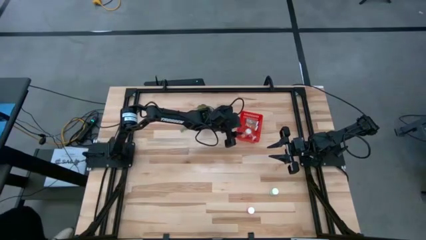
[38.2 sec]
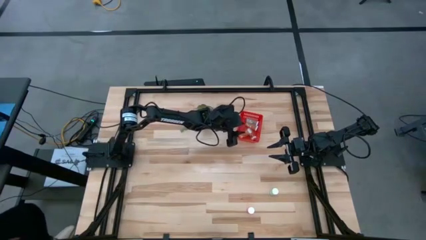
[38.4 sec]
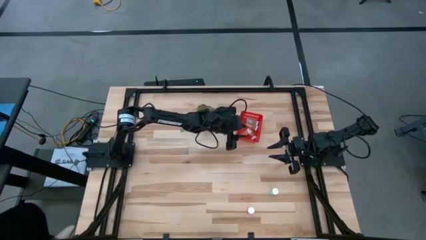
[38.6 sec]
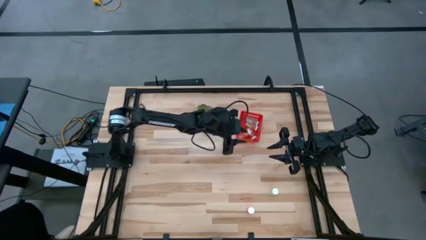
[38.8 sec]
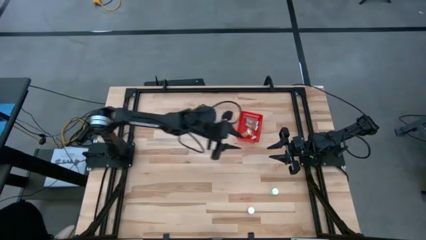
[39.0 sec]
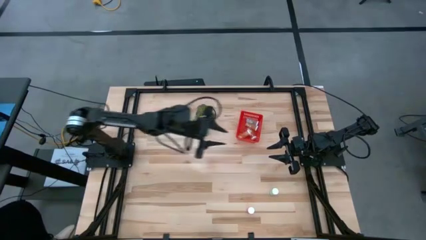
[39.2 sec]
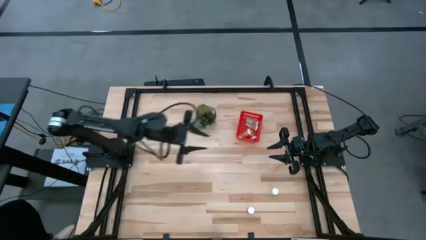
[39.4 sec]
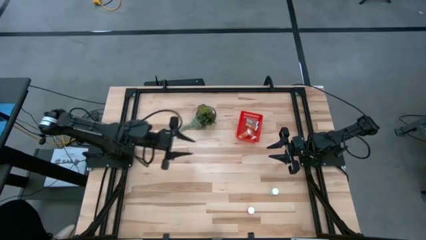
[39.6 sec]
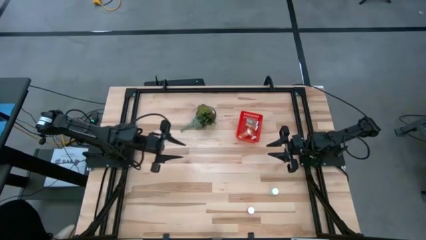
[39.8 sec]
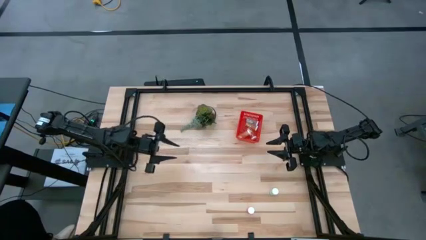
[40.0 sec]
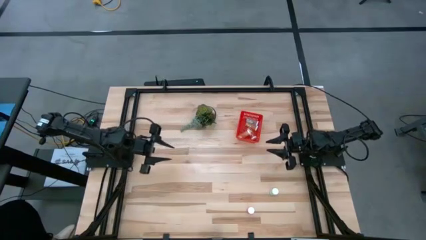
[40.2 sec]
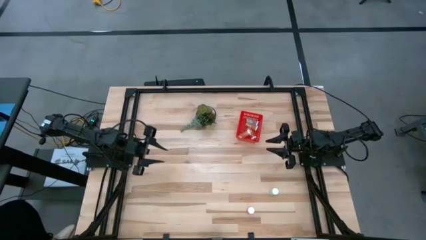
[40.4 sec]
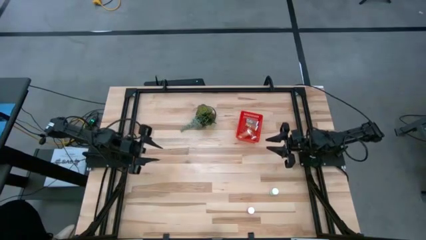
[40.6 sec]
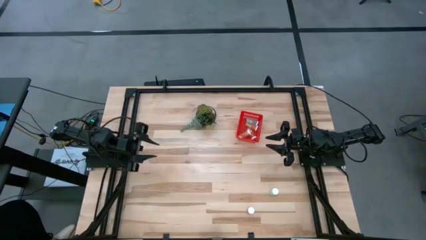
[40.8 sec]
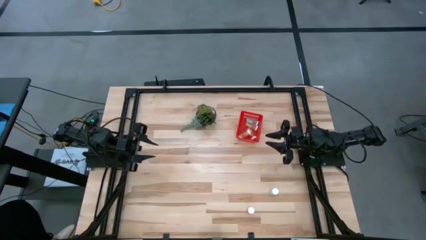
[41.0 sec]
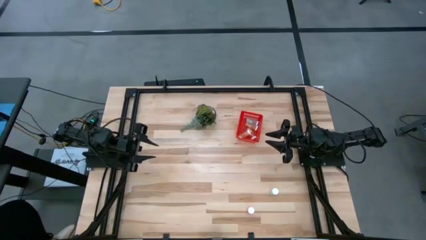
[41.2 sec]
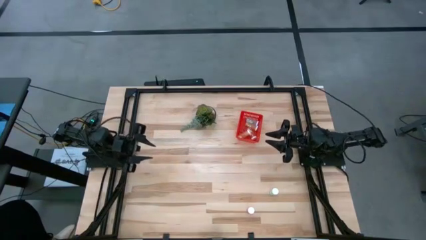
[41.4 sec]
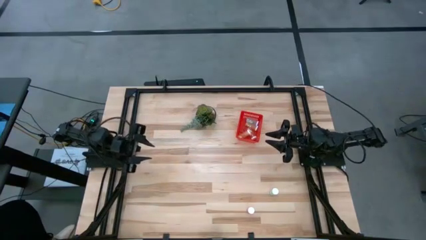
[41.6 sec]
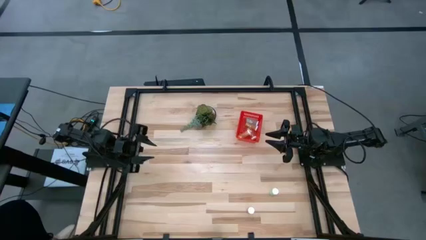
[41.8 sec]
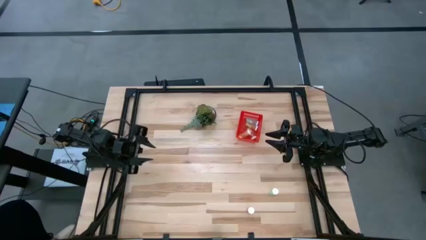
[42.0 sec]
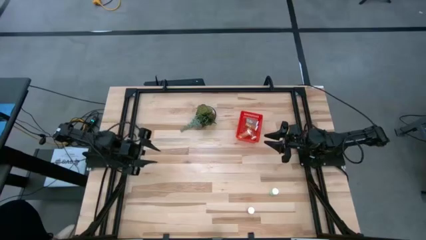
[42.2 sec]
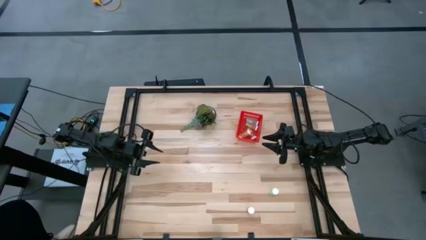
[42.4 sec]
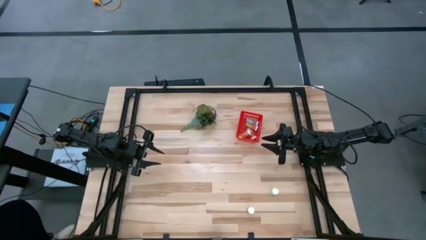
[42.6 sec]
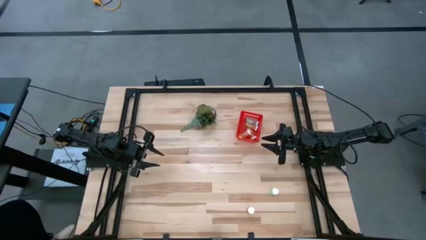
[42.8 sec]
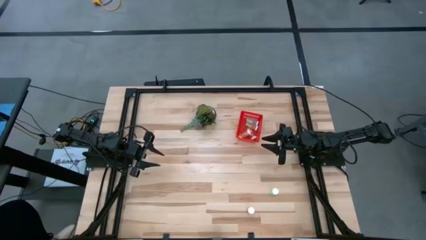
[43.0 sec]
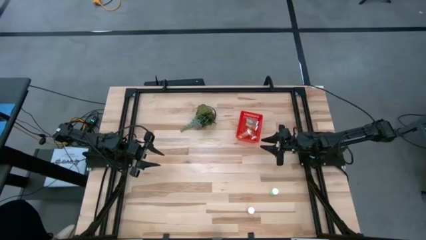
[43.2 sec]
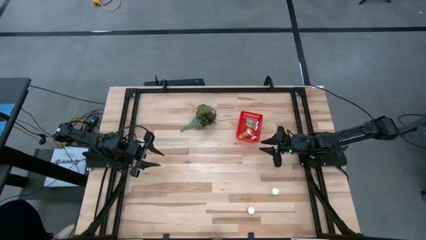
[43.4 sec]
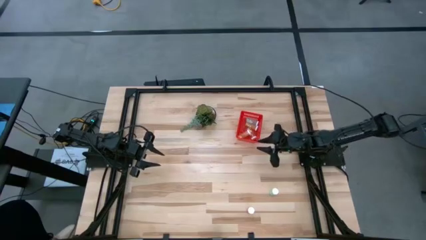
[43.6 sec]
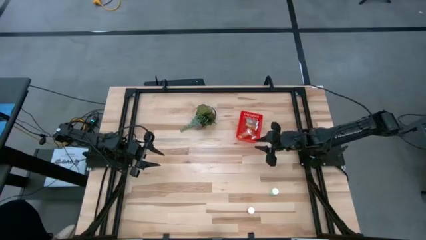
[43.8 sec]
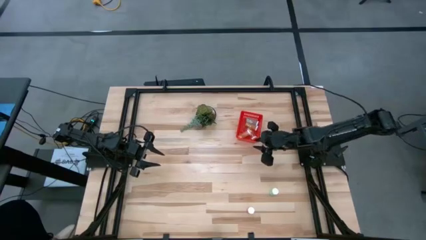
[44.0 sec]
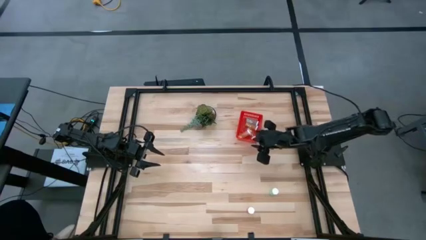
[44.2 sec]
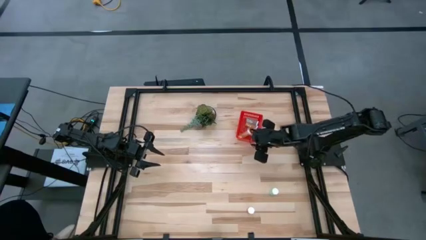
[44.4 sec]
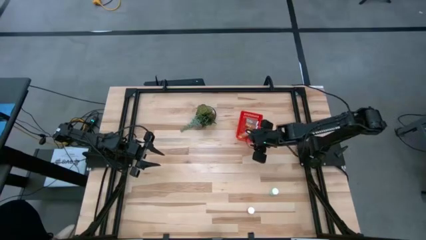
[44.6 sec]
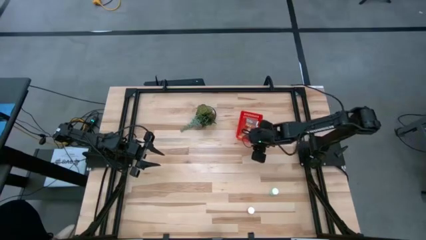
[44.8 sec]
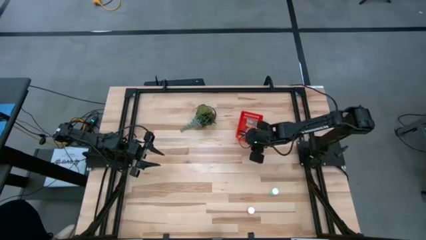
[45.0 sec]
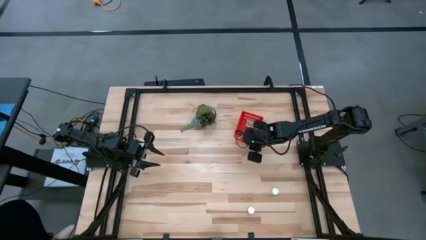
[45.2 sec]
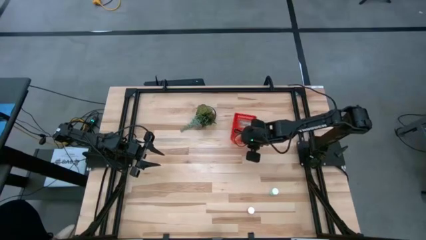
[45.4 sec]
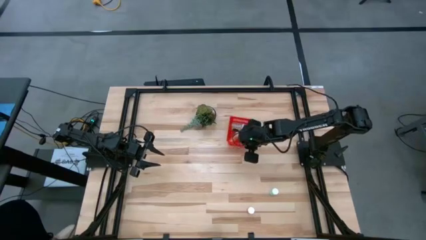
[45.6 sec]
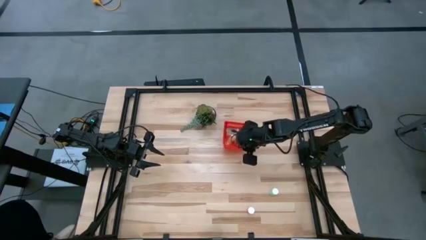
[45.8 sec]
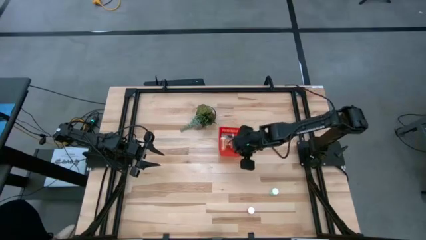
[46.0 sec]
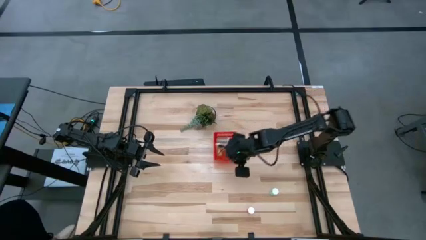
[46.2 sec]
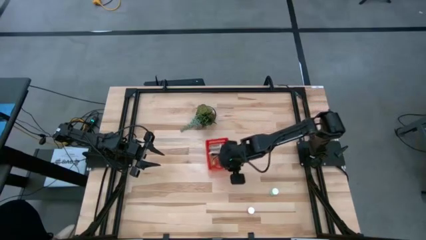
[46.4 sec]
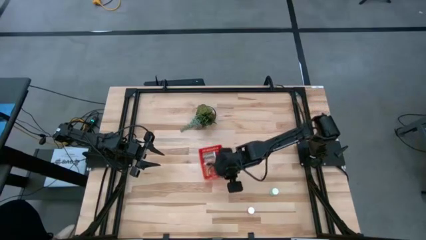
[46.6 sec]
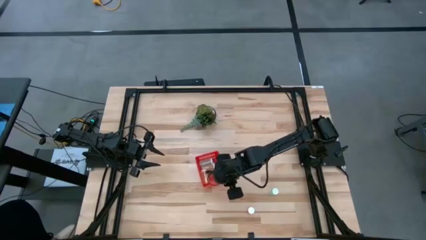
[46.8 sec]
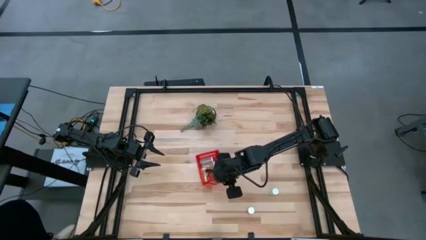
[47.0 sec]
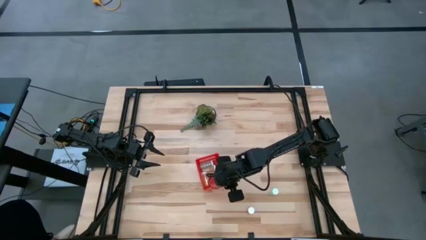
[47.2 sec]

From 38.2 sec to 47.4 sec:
Task: Pick and place pill bottles into a basket
Move the red basket to the center of the table

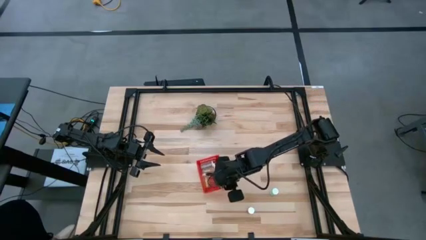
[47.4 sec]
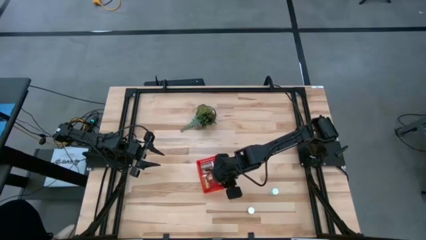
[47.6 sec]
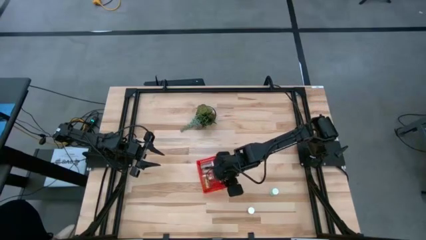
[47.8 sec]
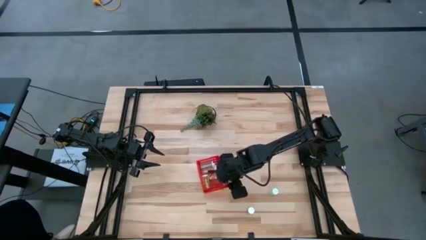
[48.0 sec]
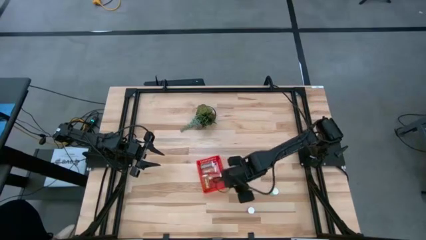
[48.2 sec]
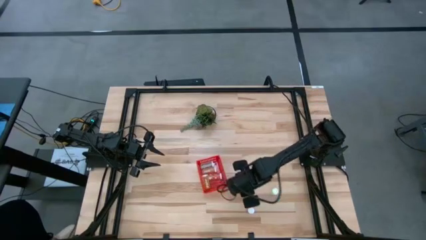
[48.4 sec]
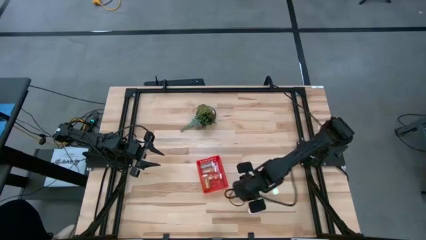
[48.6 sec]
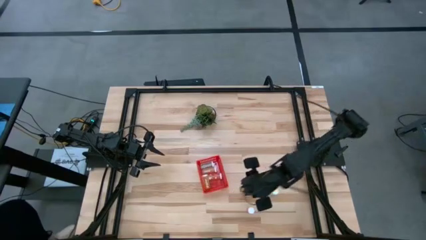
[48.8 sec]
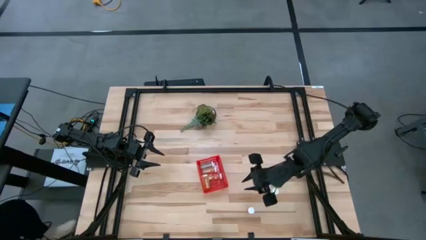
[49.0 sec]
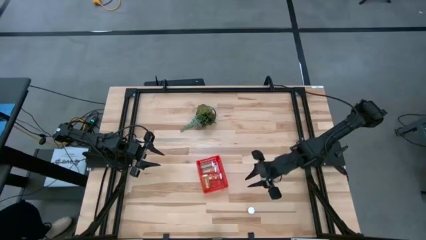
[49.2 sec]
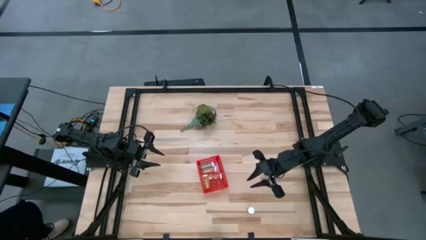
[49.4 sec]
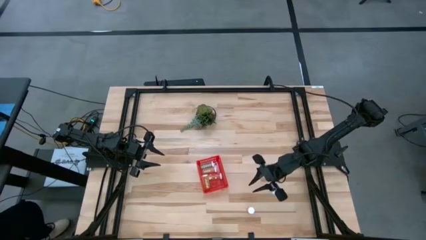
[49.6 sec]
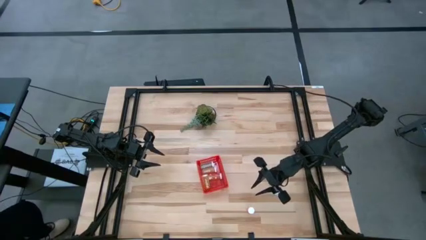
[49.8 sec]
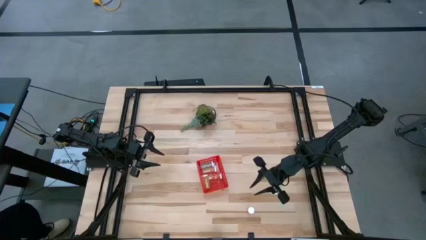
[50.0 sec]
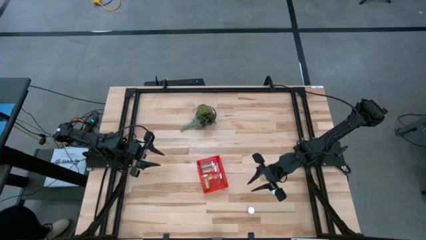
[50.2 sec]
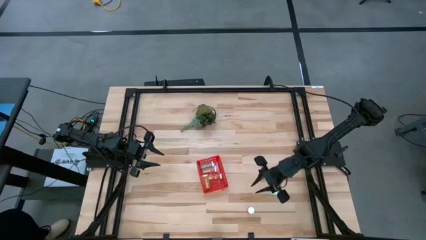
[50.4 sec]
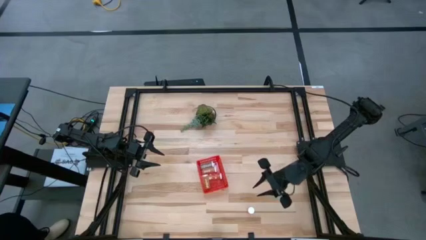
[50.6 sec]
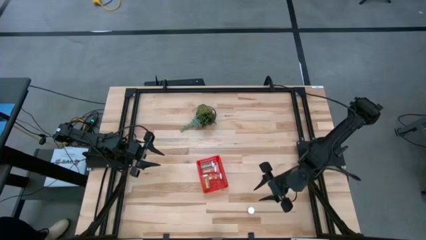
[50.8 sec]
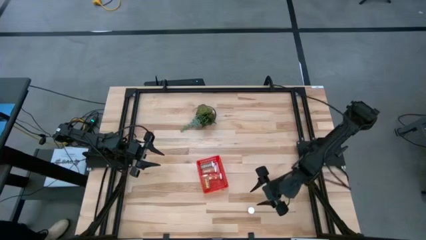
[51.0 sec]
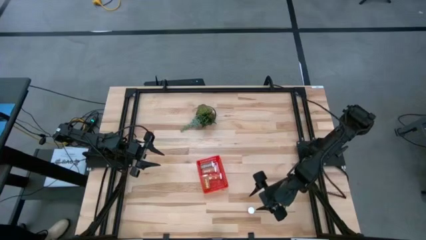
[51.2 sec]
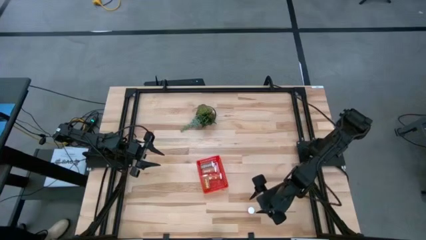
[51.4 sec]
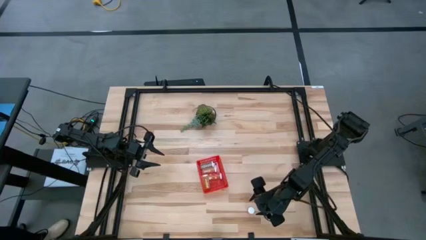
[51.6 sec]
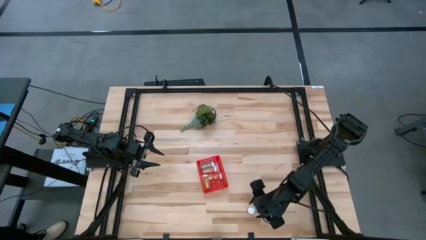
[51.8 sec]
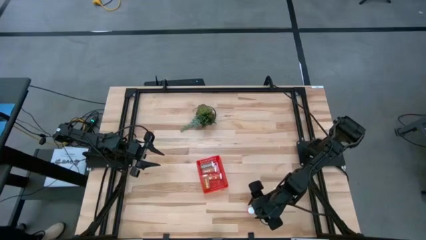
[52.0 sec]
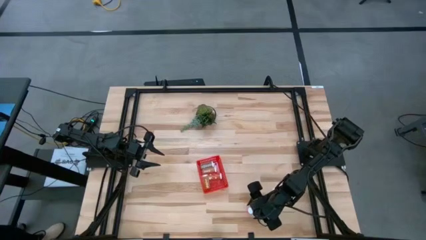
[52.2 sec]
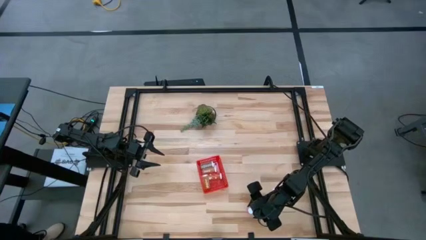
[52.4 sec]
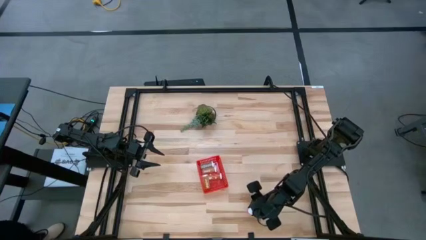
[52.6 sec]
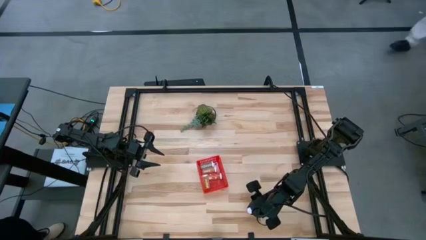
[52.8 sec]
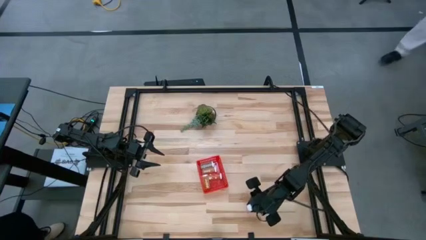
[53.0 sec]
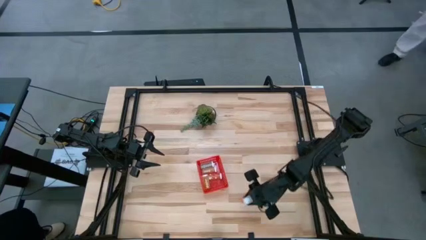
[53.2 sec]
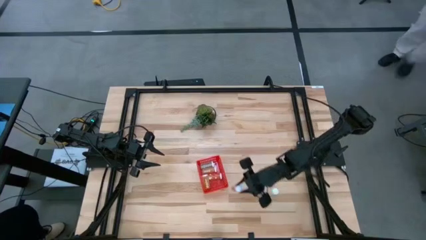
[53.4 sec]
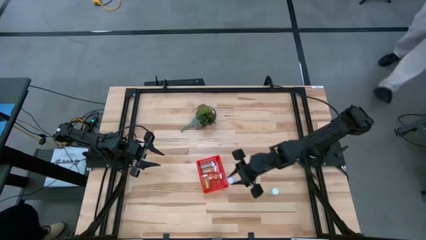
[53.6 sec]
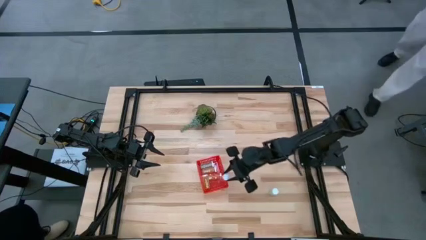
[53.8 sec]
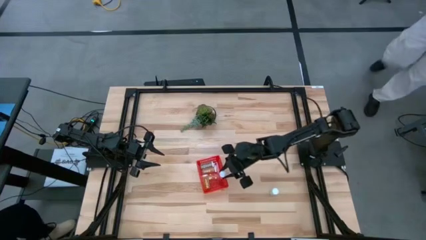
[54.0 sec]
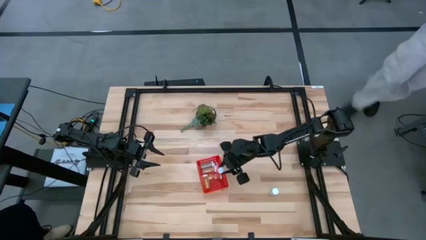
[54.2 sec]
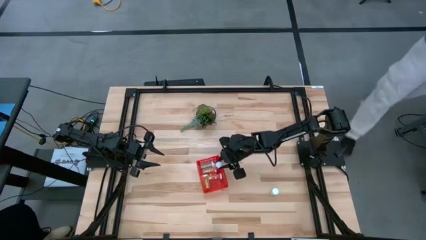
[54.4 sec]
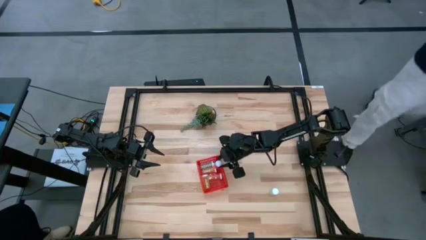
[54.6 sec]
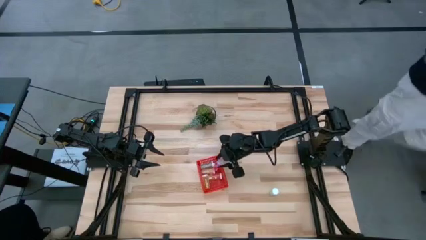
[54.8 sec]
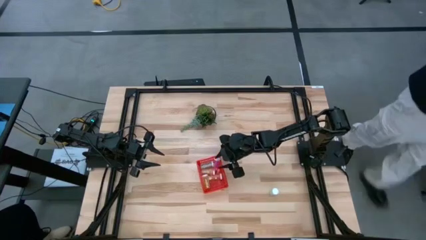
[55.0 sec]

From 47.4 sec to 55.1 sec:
Put the pink pill bottle into the red basket

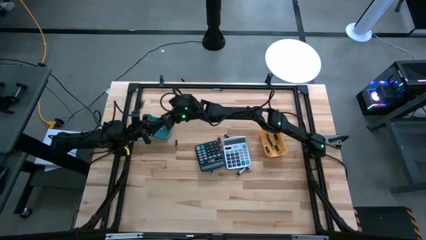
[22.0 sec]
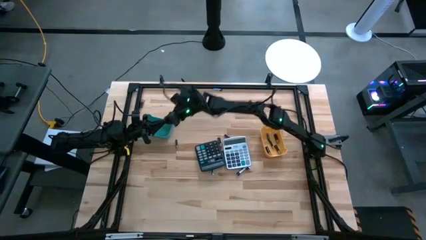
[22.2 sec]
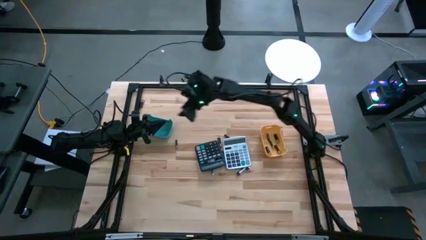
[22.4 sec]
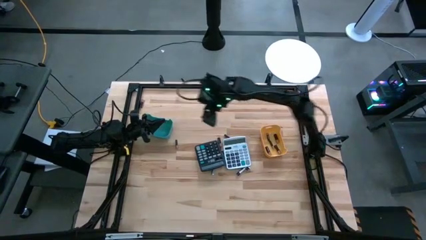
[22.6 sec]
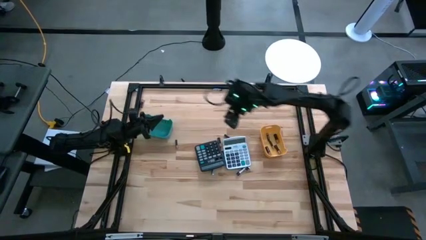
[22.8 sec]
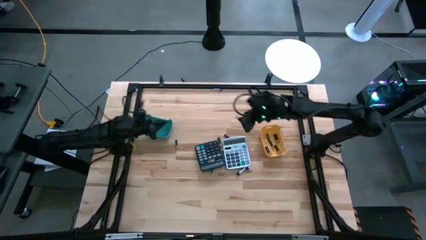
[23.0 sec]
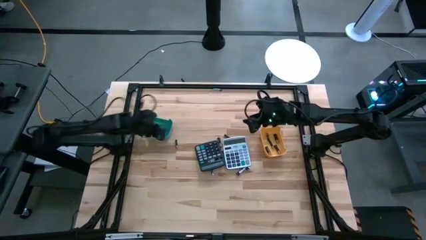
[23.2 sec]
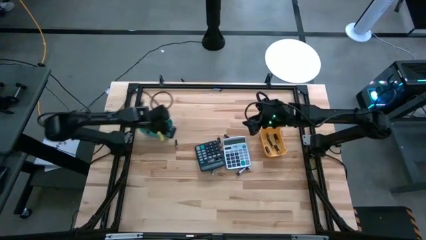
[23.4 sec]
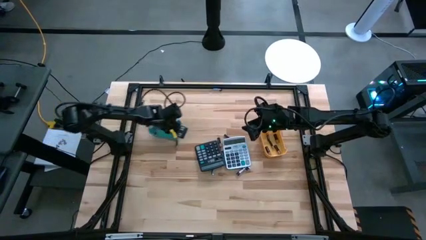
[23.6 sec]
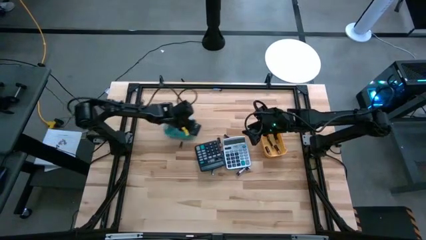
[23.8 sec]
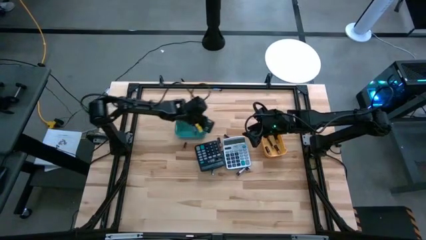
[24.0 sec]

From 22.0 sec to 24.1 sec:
Task: Sort batteries
Move the blue bin to the top left of the table
